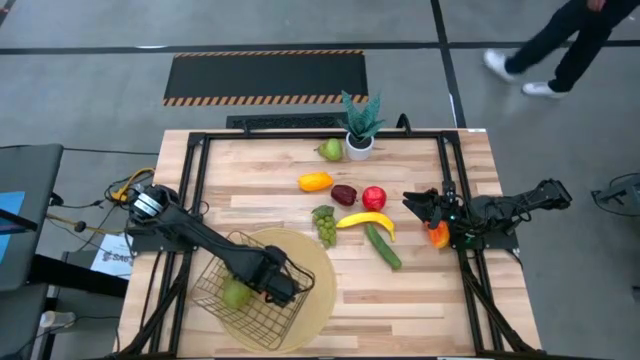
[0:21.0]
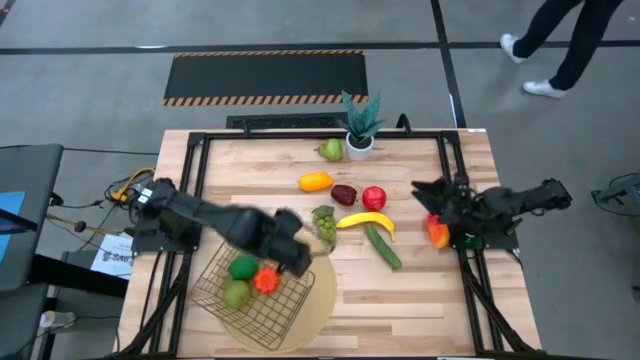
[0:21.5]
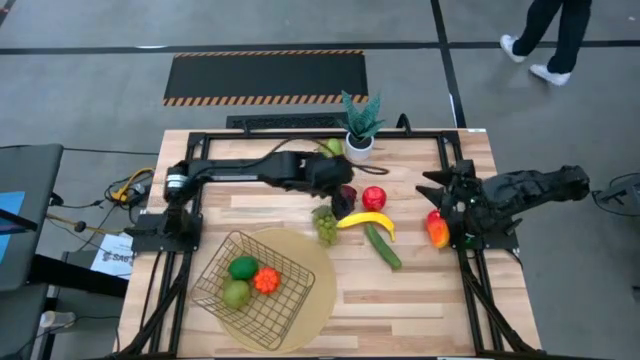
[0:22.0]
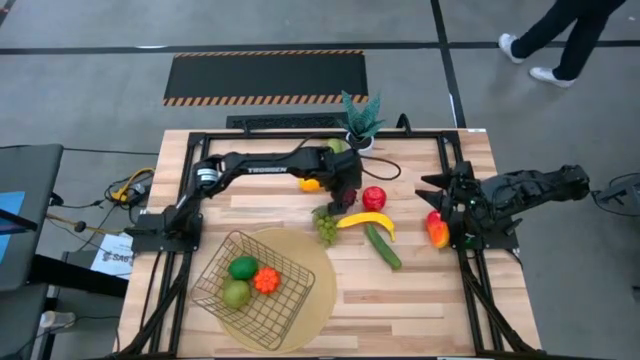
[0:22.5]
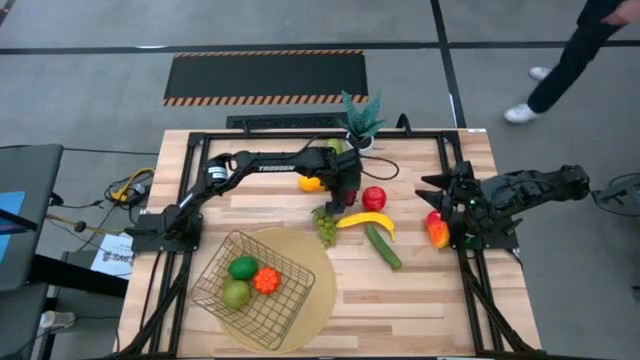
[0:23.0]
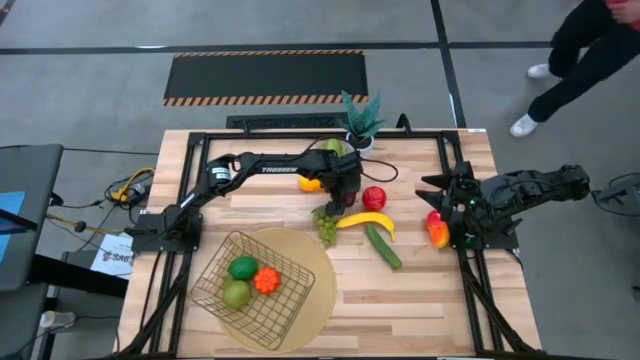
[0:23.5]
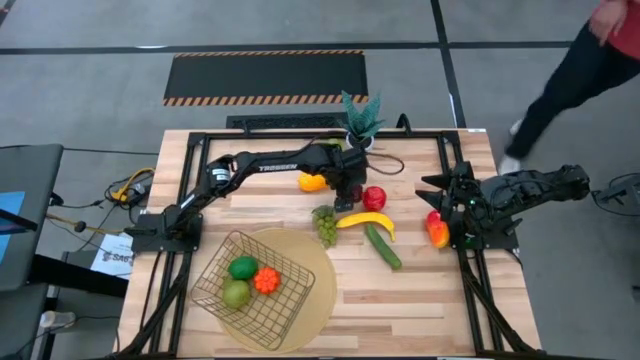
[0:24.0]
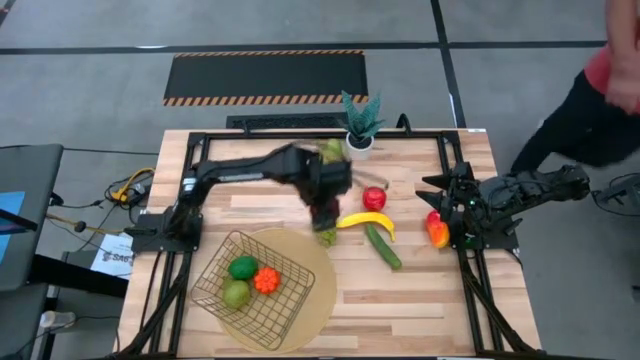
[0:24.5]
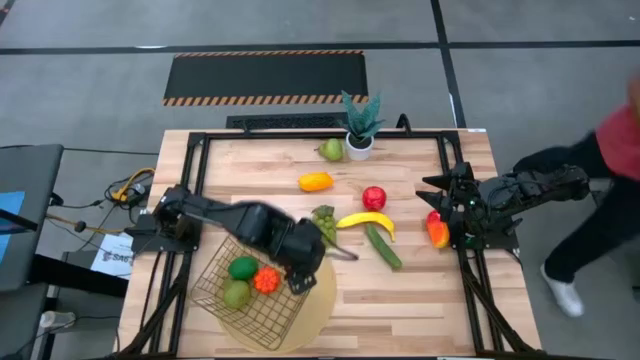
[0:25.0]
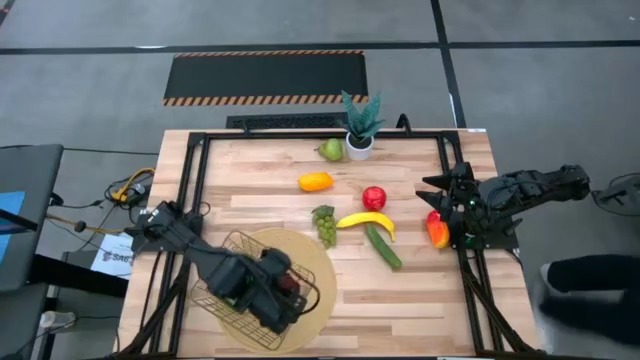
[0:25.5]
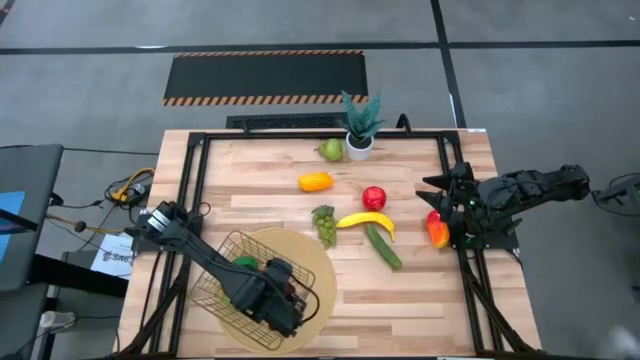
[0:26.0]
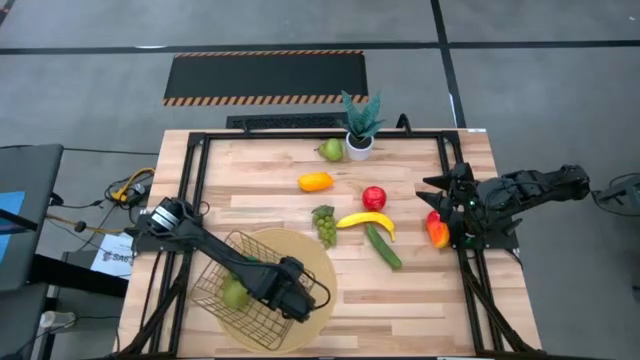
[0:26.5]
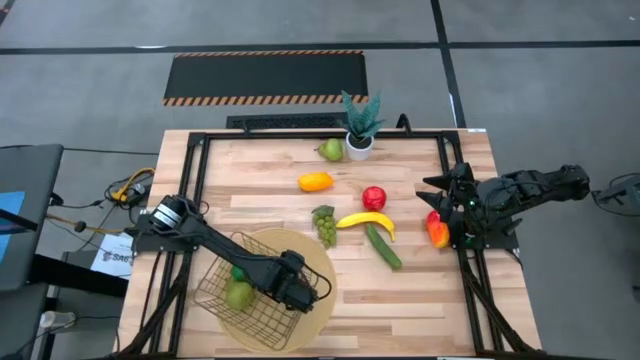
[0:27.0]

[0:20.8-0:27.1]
Task: Build produce basket
Put the dark red apple into the mesh basket

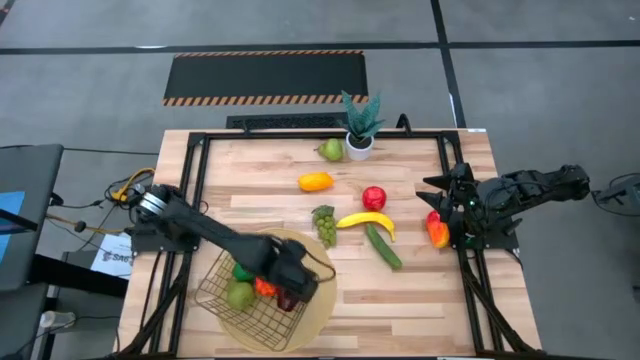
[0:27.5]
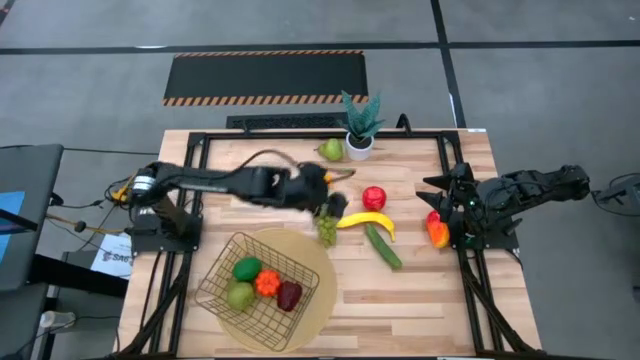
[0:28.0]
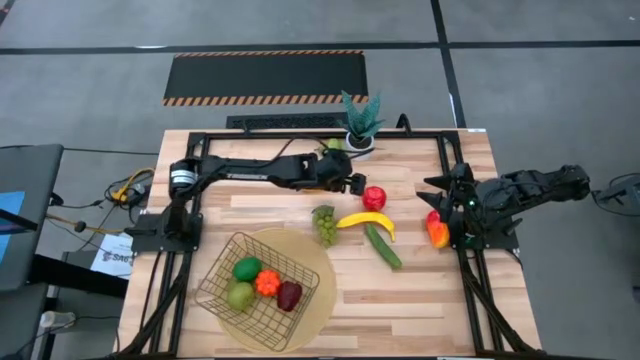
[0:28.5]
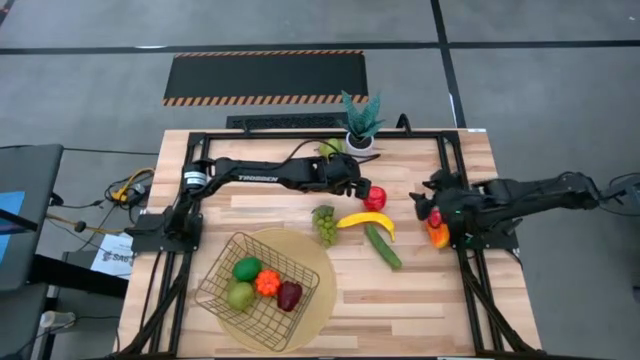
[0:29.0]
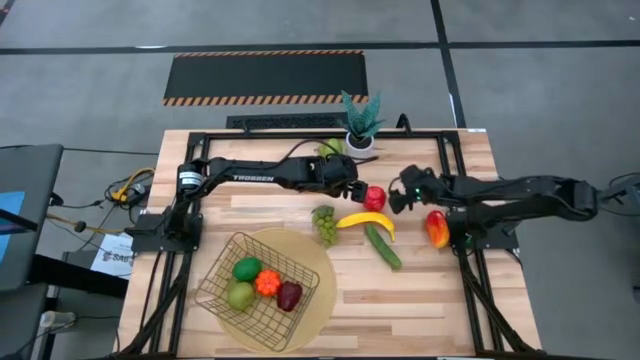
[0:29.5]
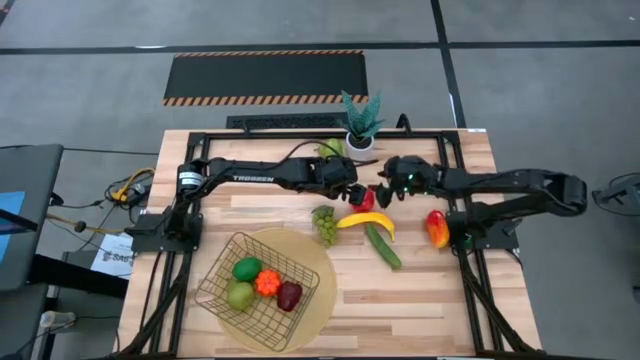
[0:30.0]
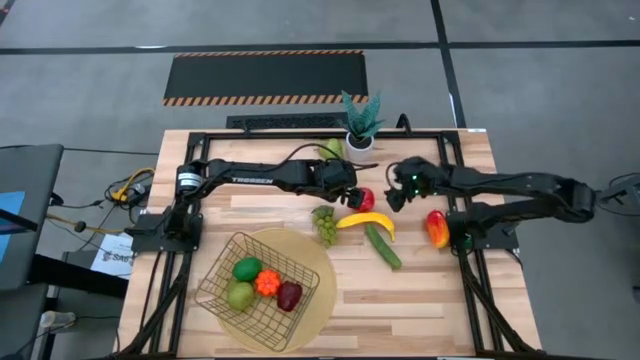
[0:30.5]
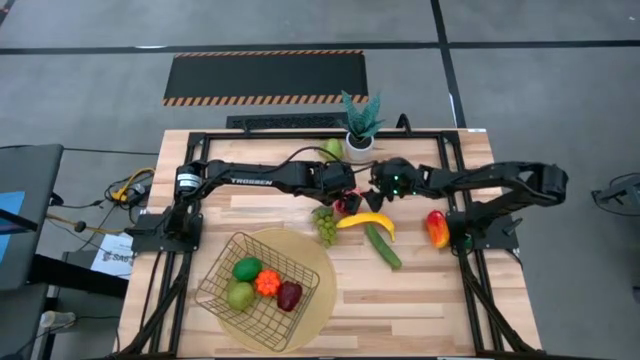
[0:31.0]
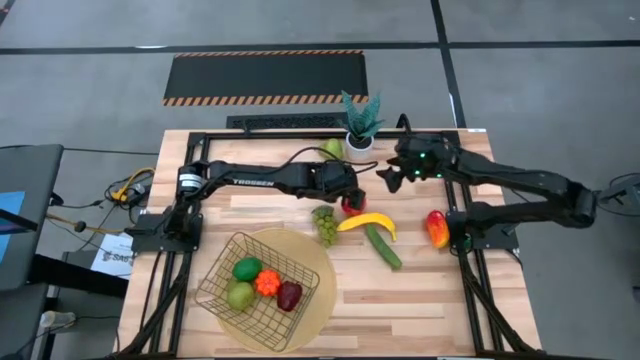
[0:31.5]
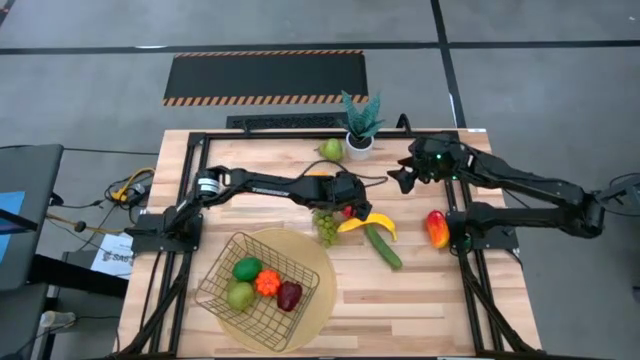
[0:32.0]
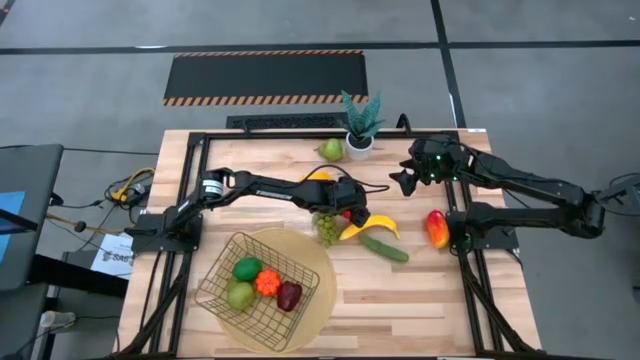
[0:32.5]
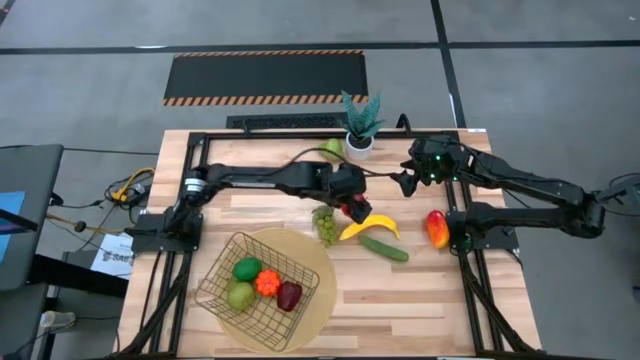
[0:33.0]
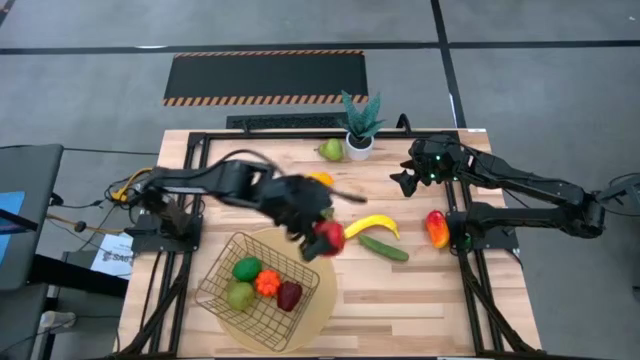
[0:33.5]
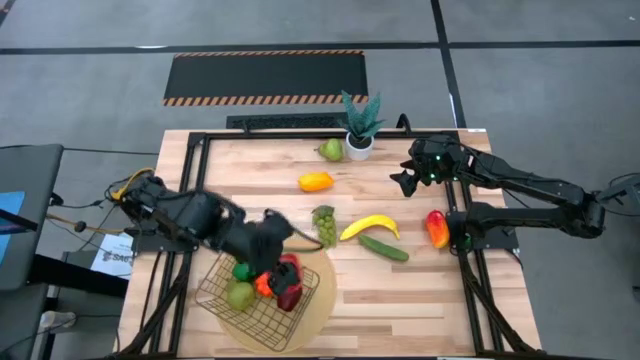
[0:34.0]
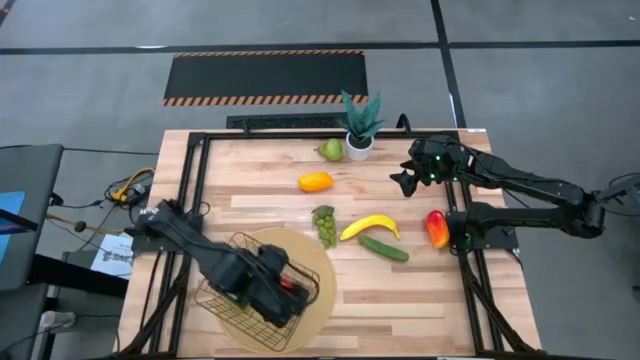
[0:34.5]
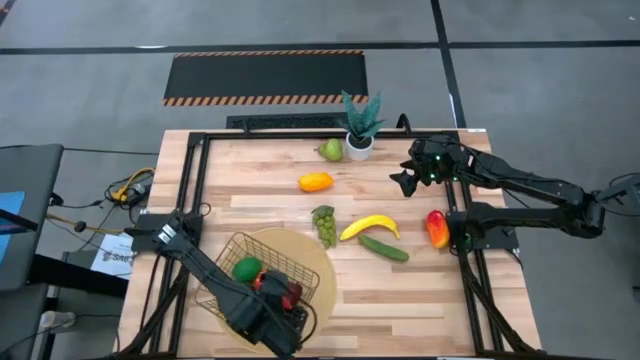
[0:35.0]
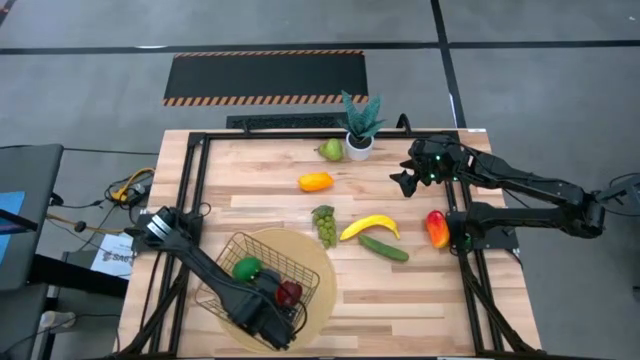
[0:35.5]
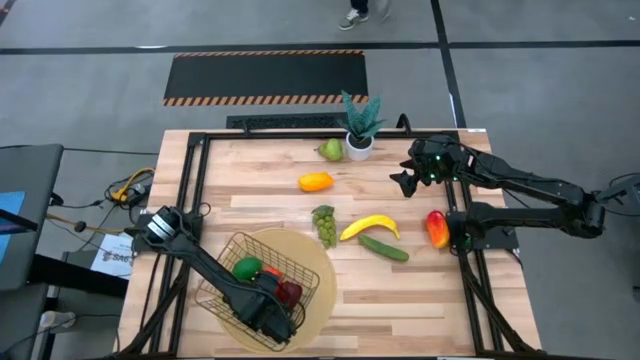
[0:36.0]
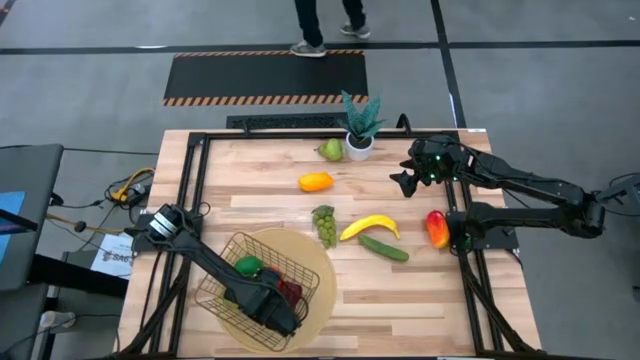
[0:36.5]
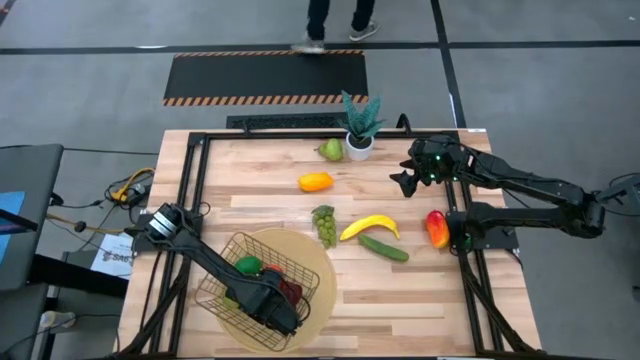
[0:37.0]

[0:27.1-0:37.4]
Put the light red apple into the mesh basket

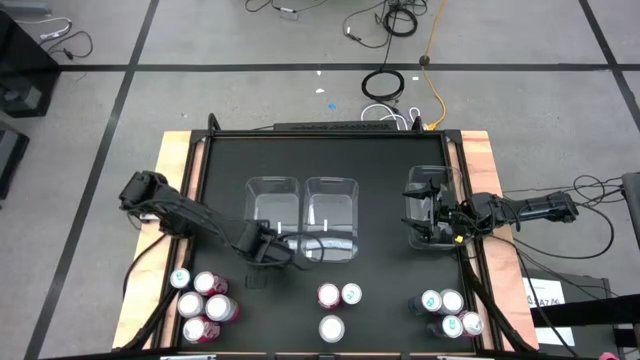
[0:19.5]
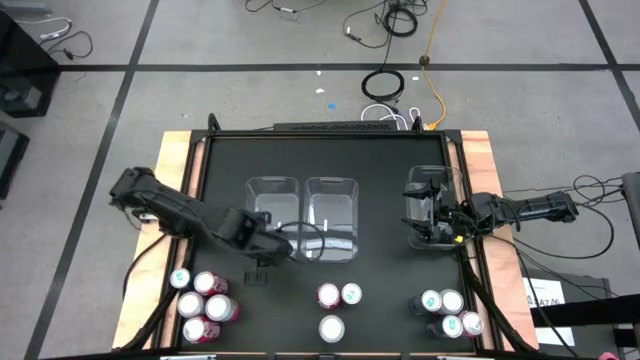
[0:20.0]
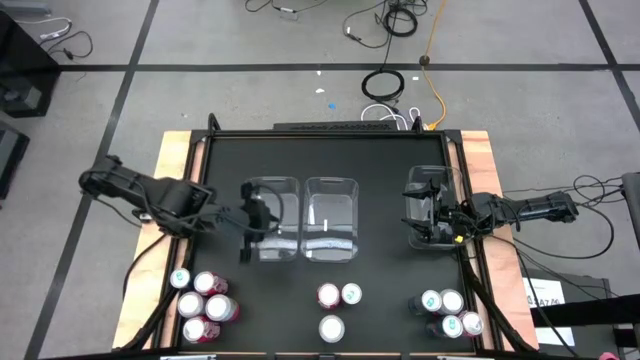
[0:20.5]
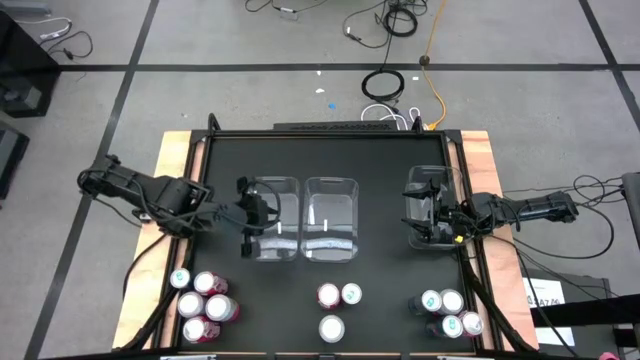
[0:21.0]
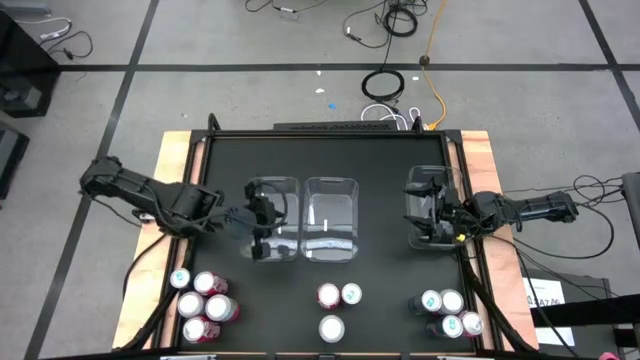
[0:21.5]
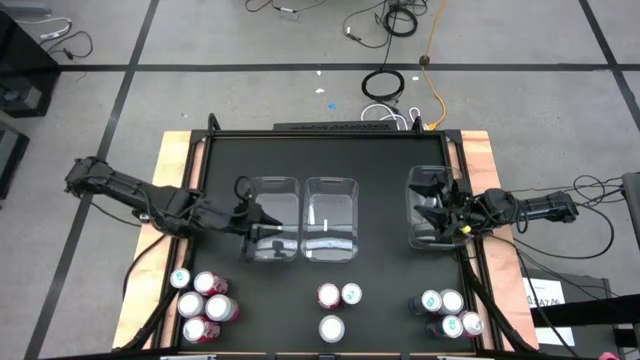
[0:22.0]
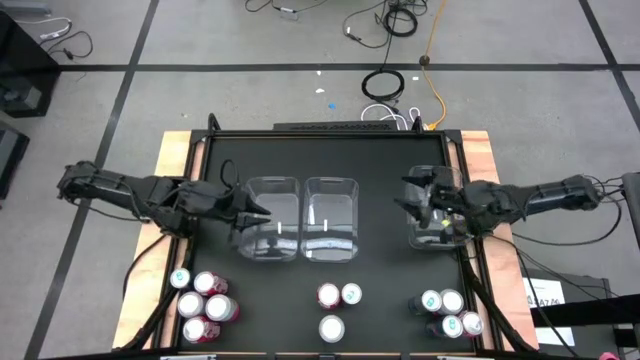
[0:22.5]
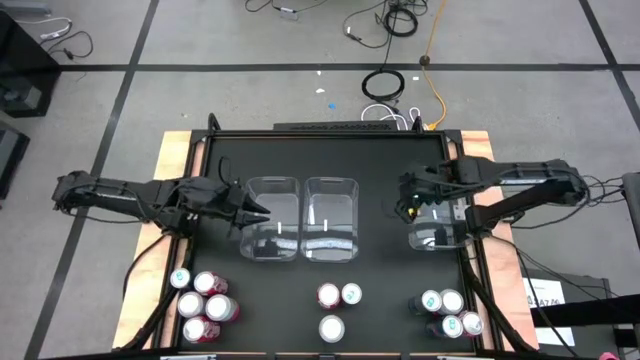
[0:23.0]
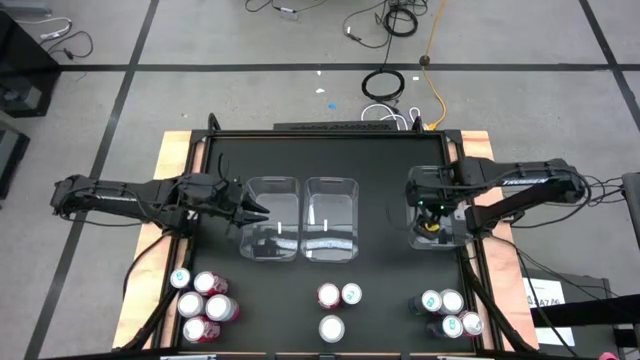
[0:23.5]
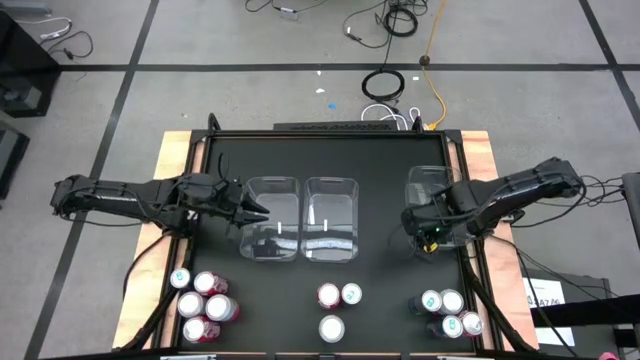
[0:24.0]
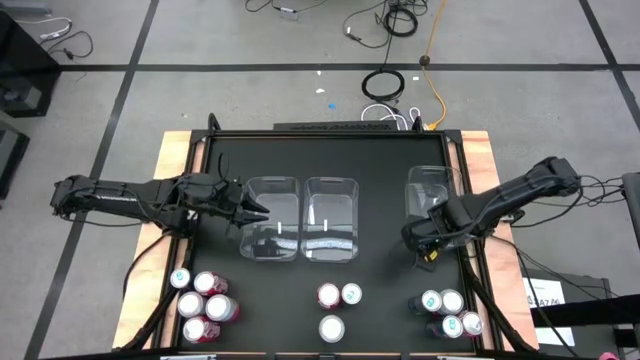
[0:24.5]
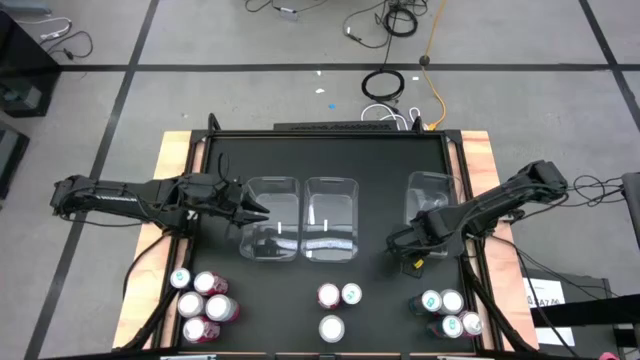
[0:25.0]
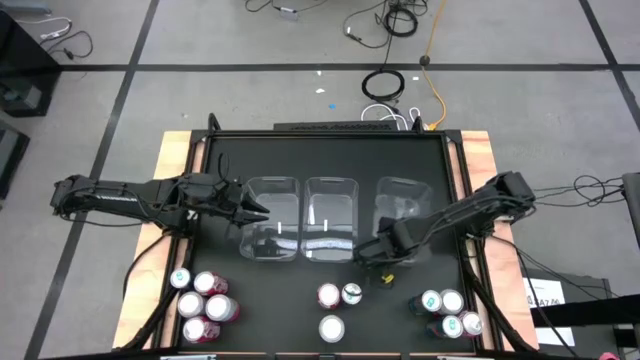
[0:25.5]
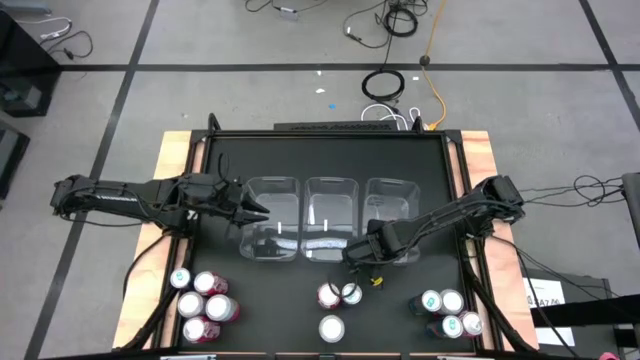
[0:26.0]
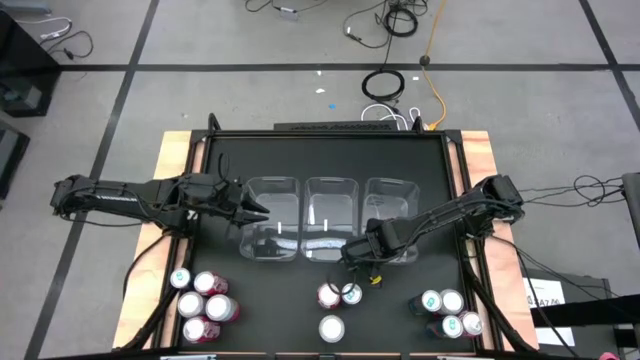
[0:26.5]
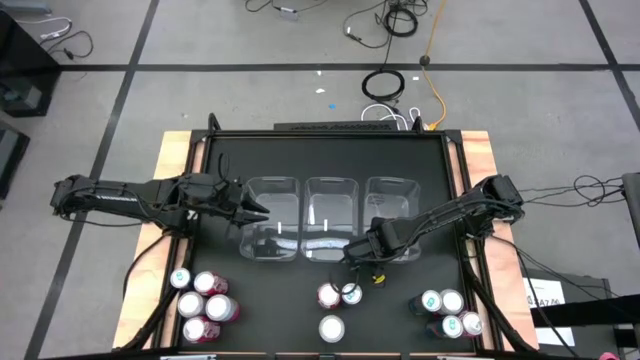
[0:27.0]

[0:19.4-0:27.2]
Task: Sort soda cans
Move the middle right transparent bin beside the center transparent bin
